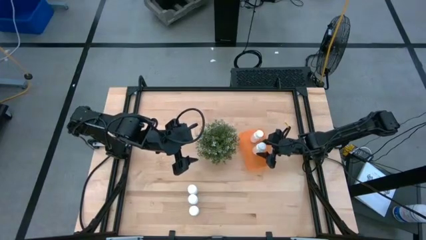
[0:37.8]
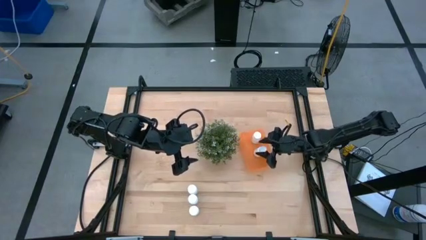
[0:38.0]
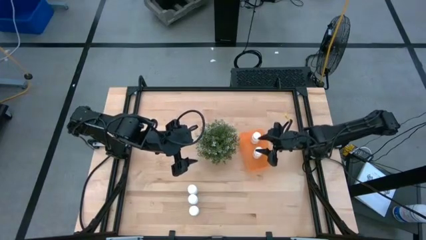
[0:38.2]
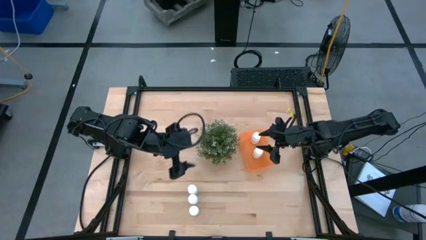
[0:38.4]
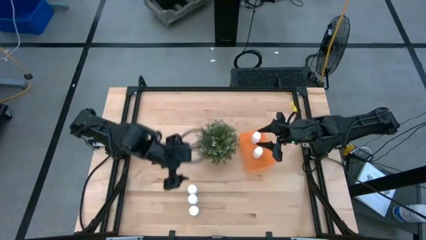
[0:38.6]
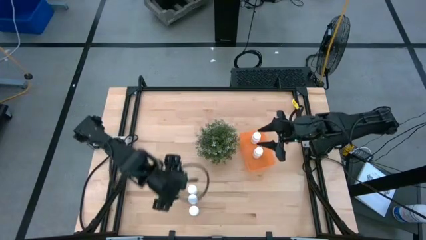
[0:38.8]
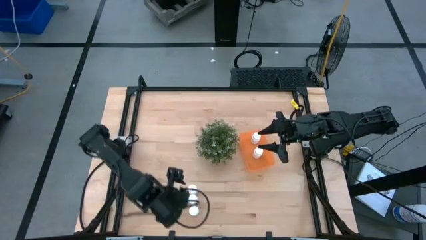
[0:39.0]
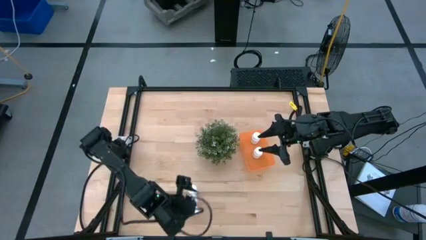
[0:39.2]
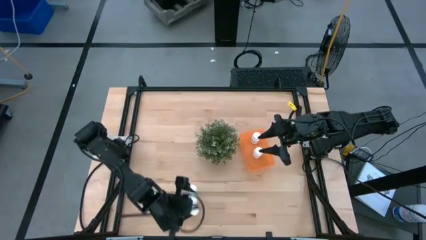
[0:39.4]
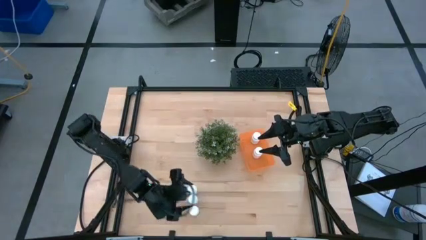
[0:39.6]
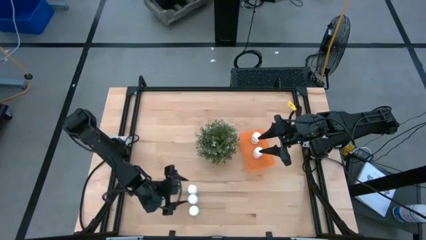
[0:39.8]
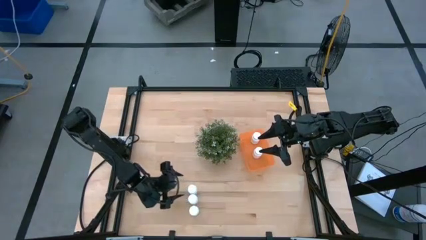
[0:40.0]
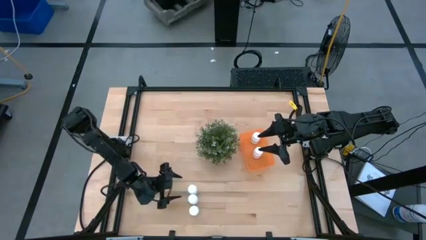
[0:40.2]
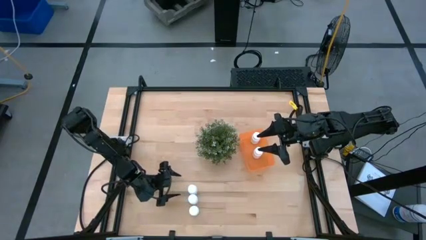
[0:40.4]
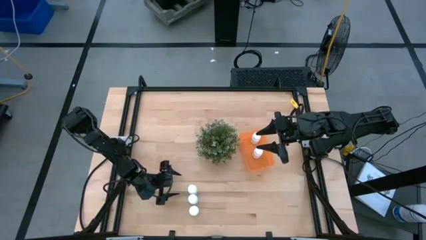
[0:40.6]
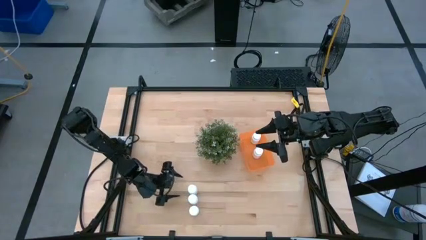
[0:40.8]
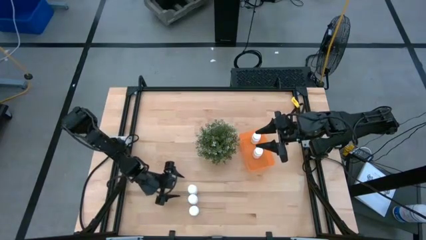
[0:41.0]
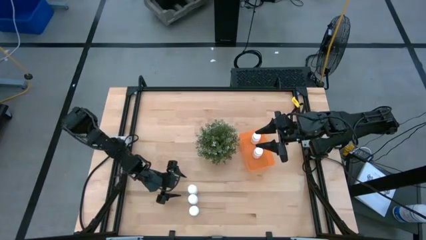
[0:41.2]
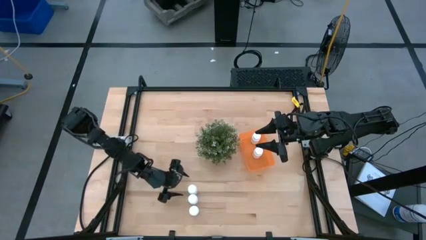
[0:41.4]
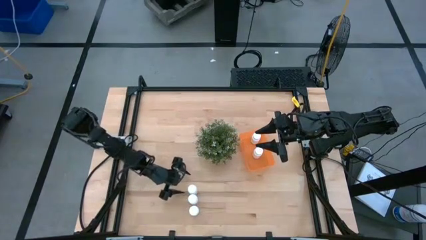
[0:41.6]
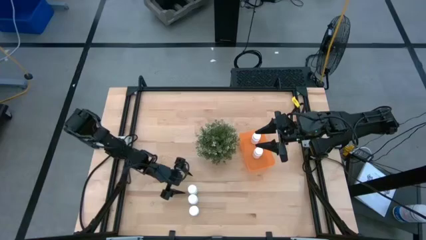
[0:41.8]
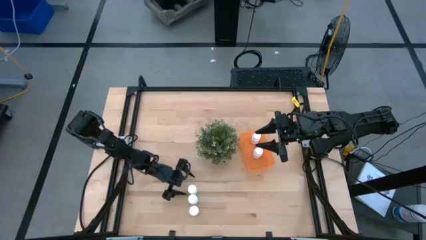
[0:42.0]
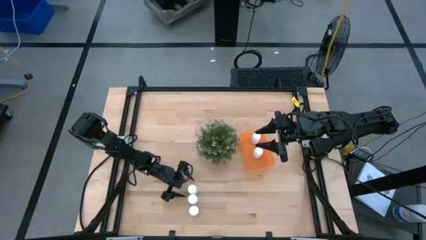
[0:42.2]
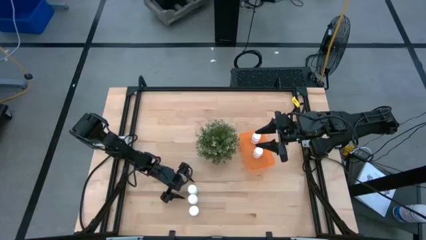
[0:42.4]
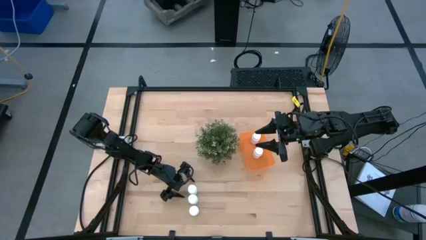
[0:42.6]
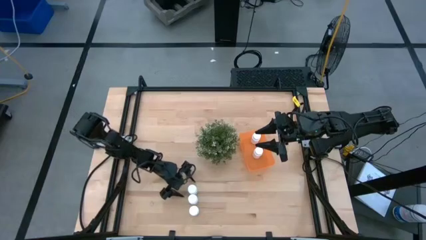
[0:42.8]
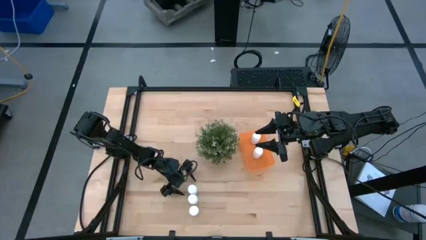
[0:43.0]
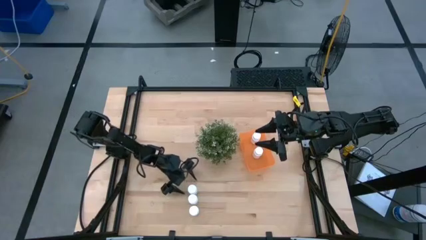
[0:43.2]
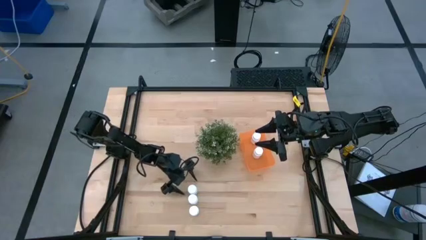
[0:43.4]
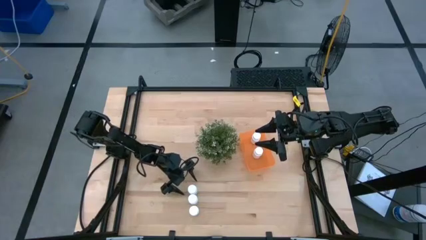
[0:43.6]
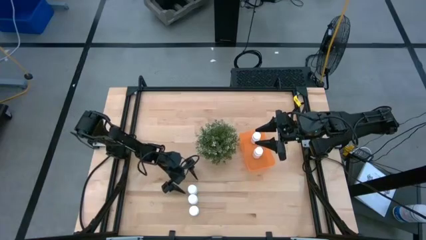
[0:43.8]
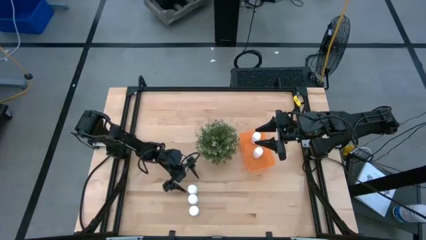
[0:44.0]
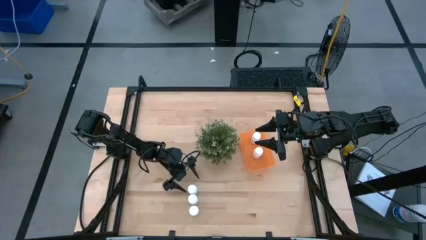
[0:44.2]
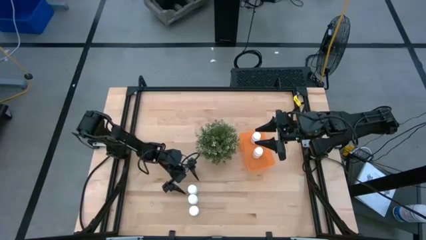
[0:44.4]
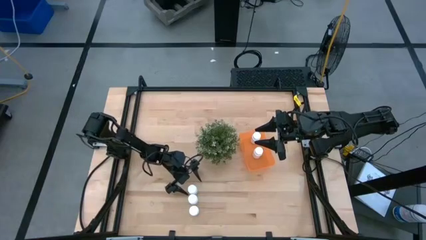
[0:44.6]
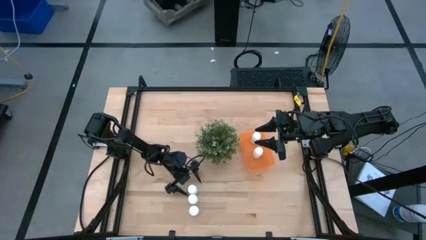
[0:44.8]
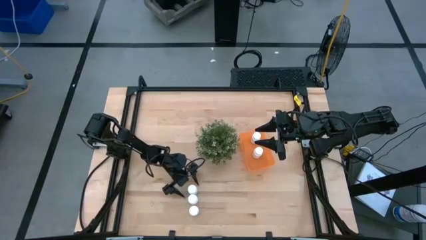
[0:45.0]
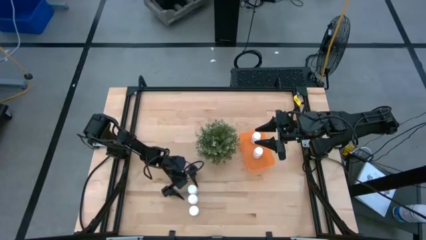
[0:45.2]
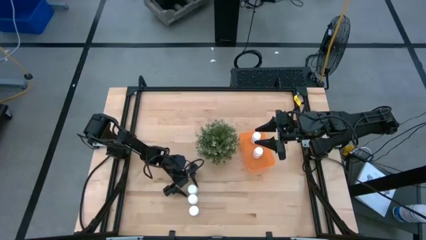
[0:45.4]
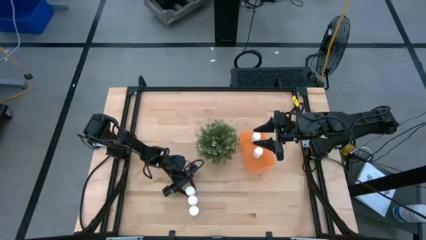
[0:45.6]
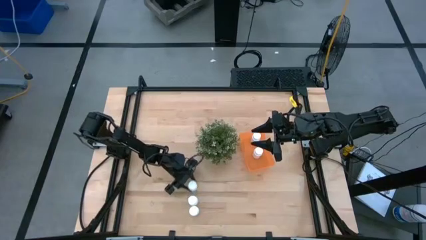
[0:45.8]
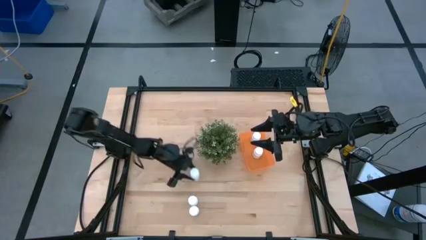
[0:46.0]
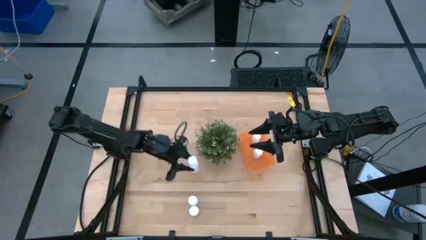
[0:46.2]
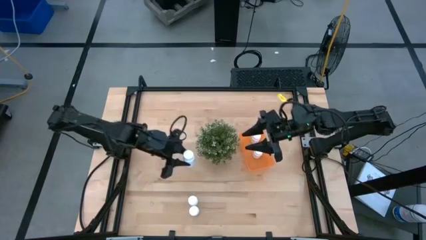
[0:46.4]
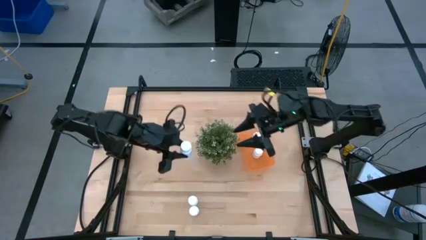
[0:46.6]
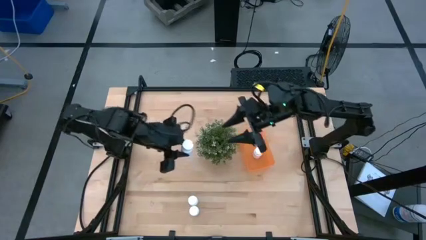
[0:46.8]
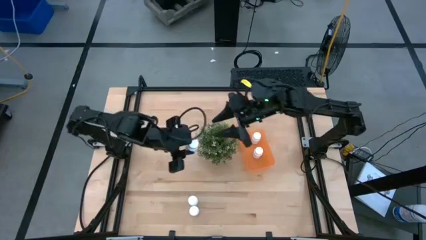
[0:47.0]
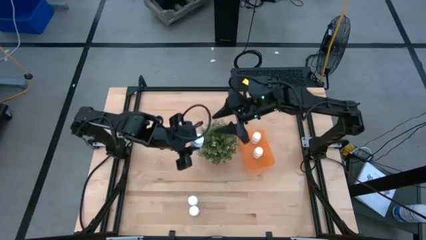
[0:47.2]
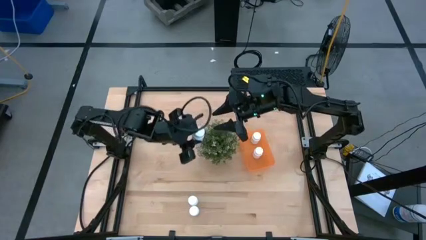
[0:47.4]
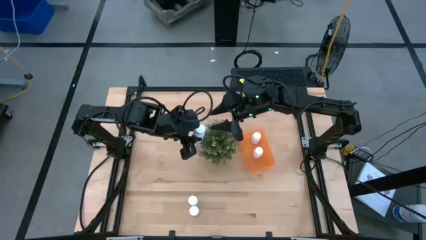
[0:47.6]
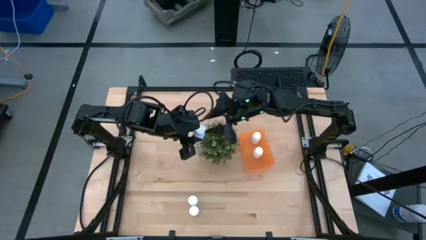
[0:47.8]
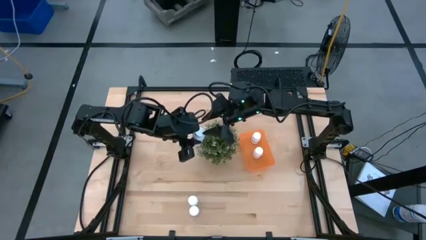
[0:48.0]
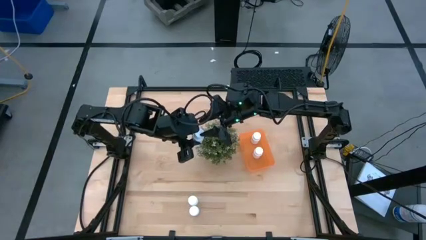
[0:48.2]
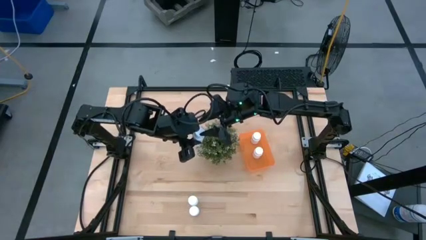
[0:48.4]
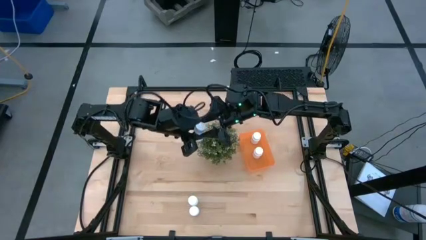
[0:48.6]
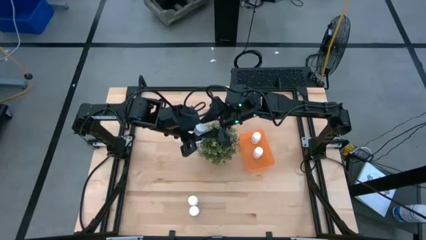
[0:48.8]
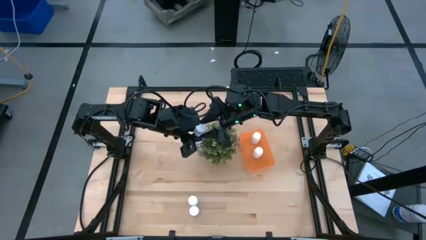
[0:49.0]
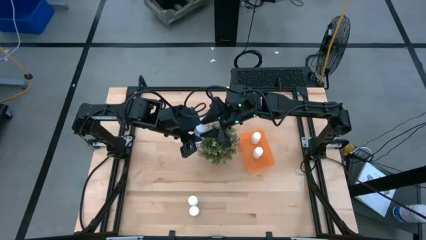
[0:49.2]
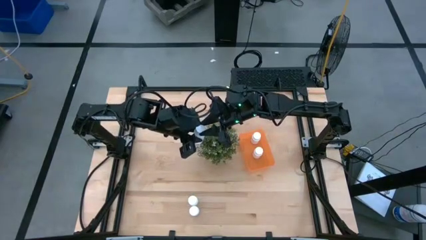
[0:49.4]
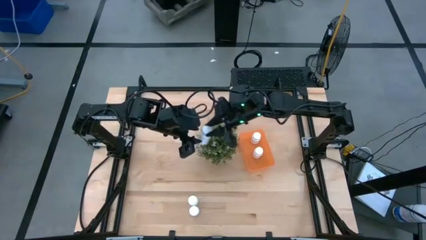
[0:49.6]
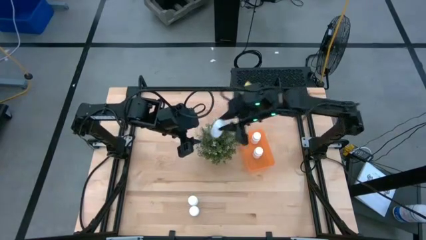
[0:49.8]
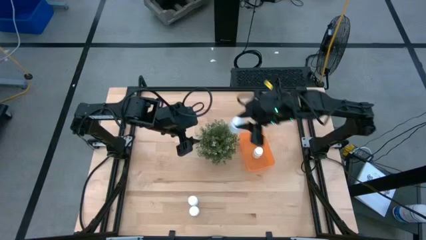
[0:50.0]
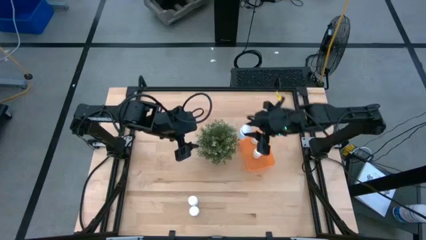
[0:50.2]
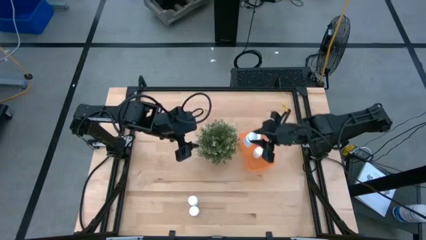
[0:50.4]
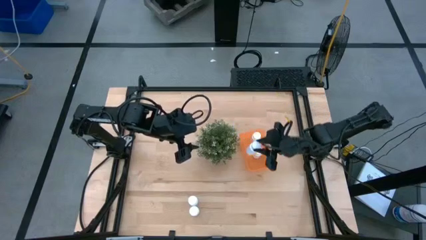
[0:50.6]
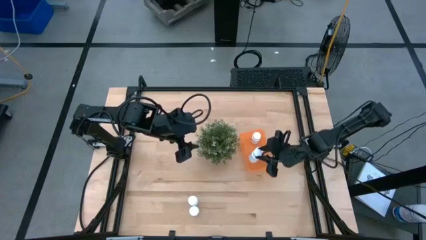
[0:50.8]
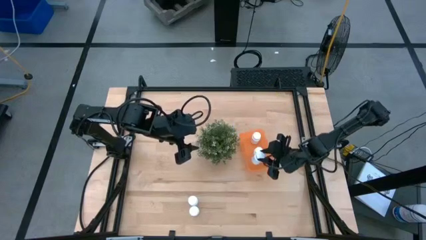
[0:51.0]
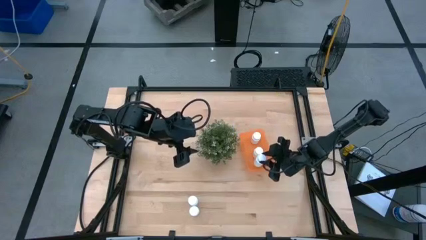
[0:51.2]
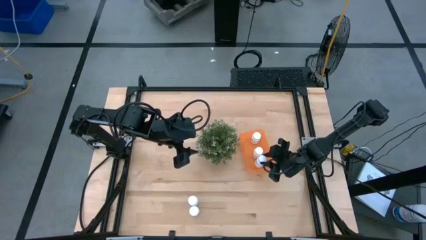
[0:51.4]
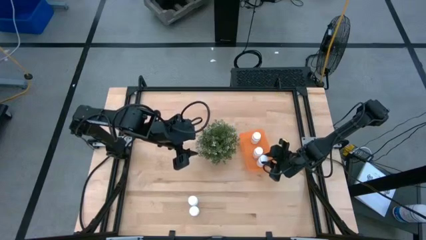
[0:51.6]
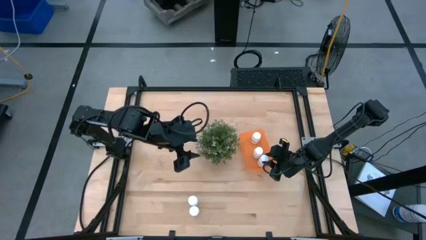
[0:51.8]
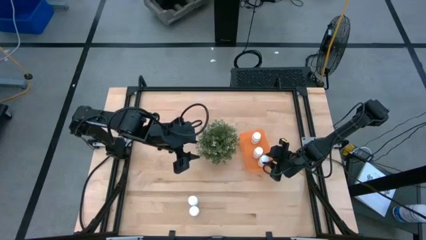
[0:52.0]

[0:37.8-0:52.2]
Task: Pick and place pill bottles into a basket
Put the white medicine bottle into the orange bin
